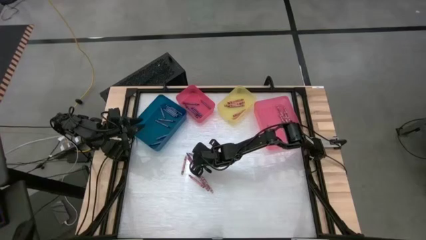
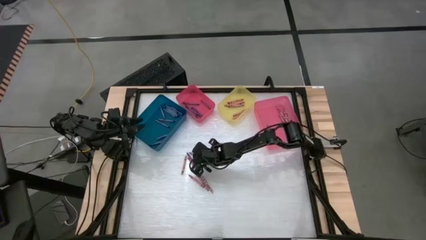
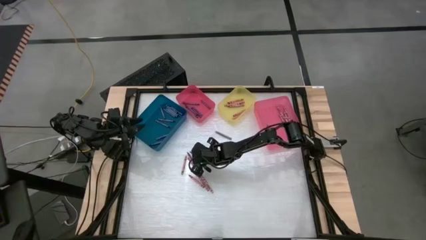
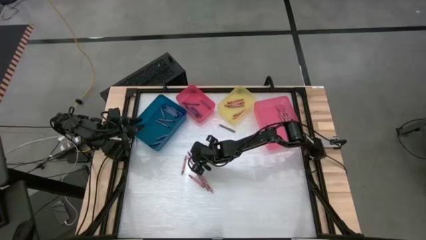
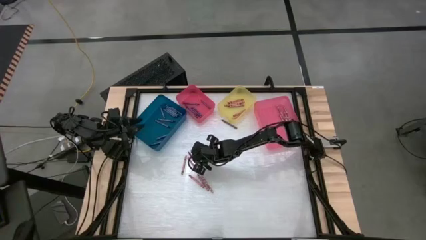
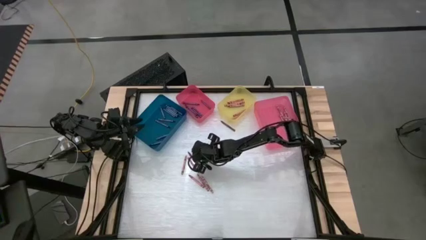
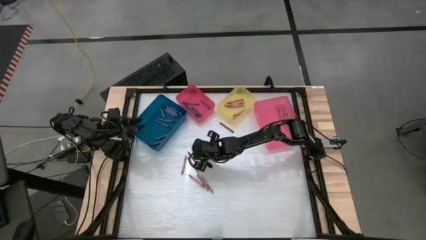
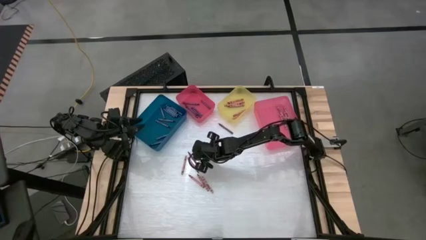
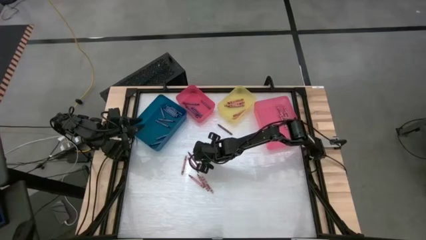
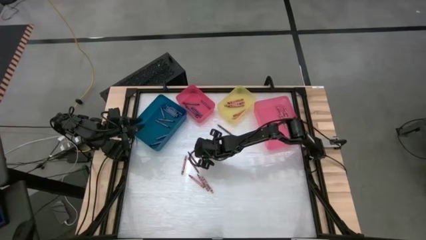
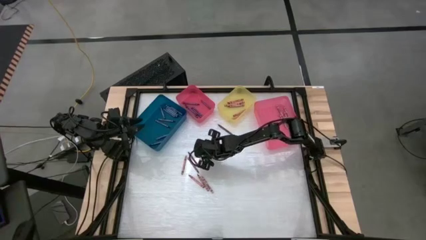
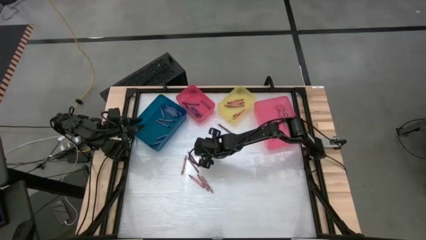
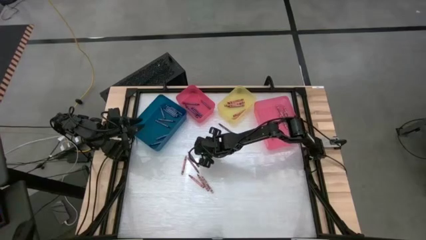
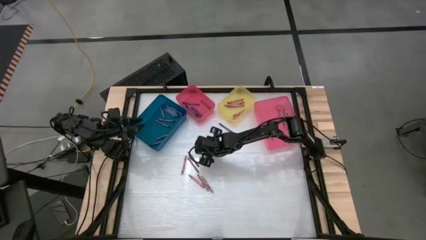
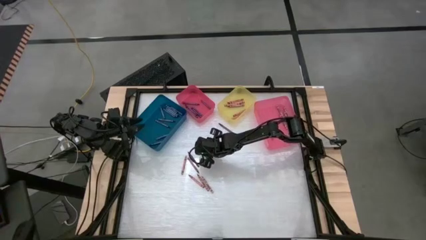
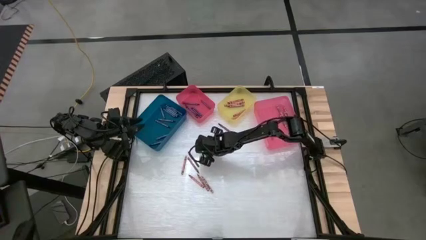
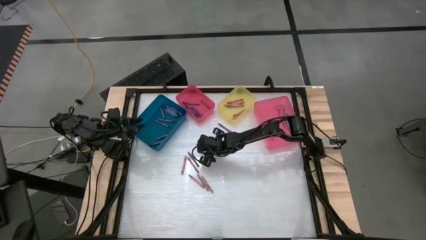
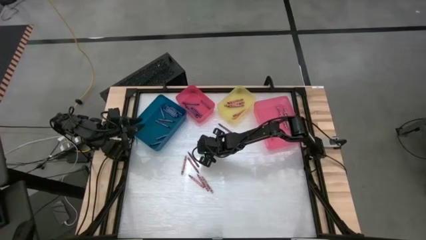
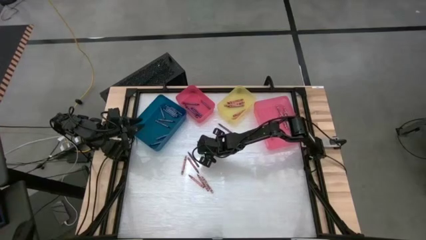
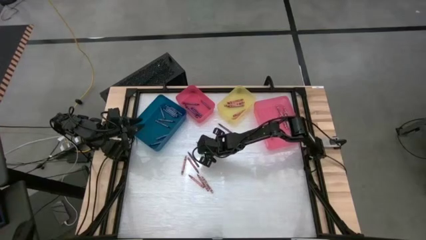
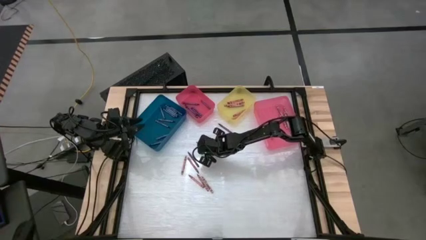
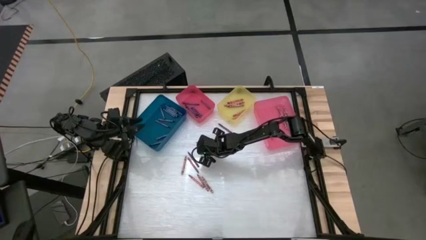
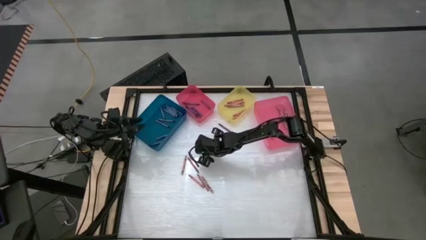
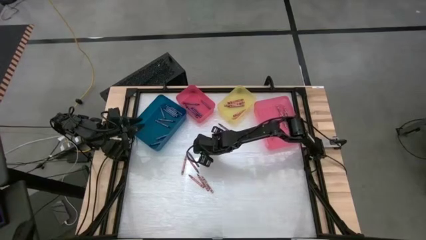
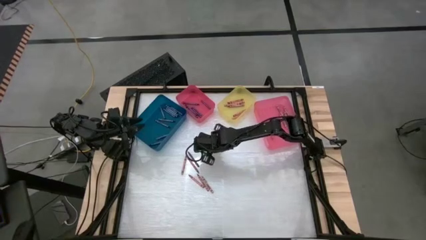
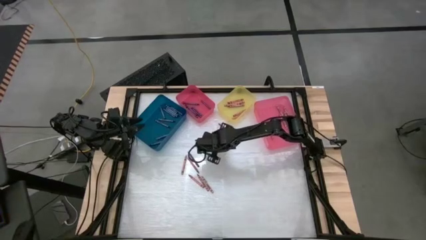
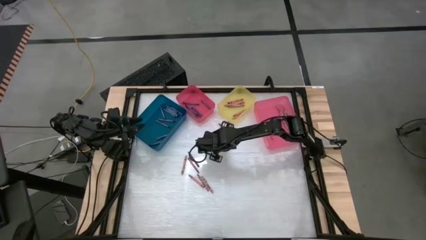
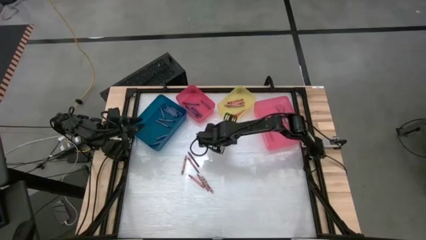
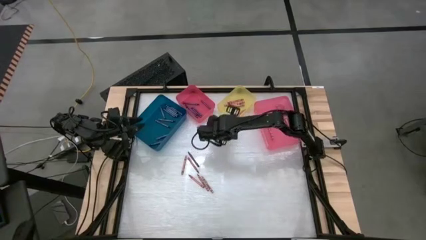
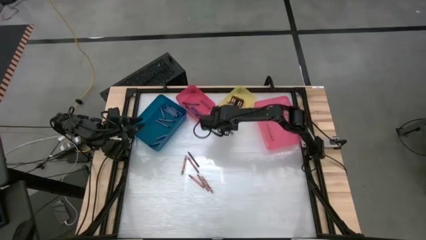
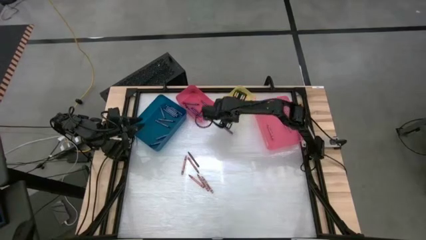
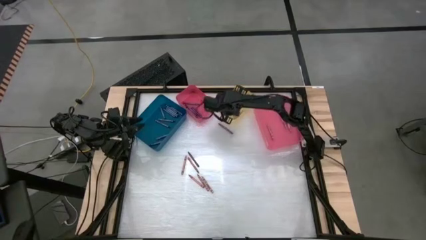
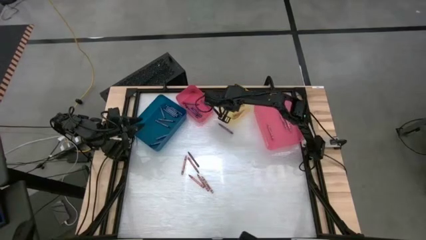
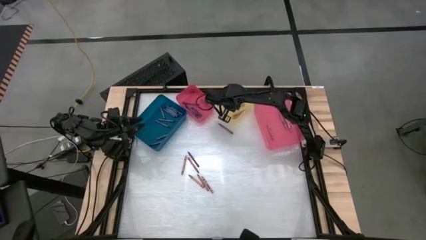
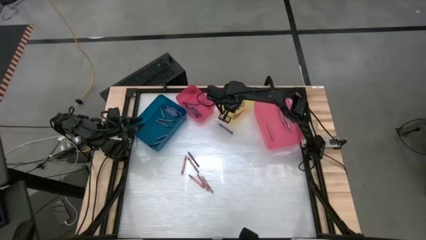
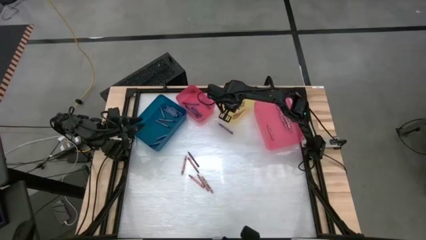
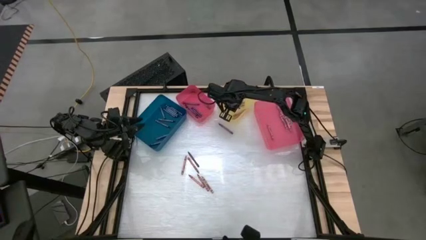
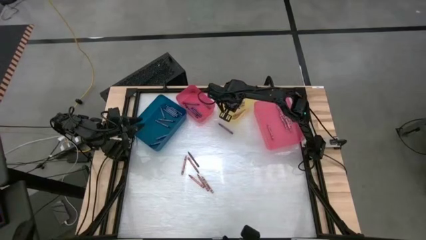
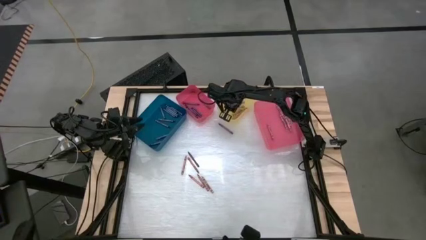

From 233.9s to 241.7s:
Task: Sort crayons
Put the red crayon into the yellow bin

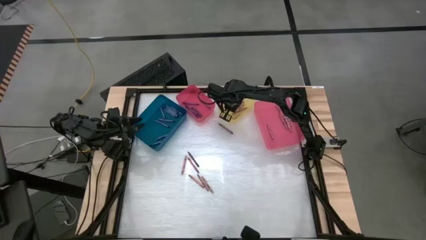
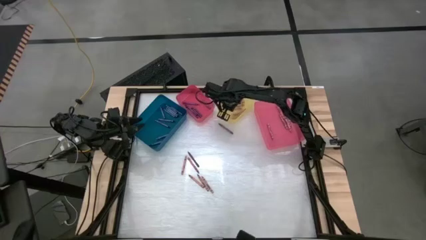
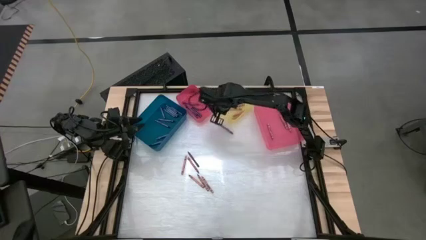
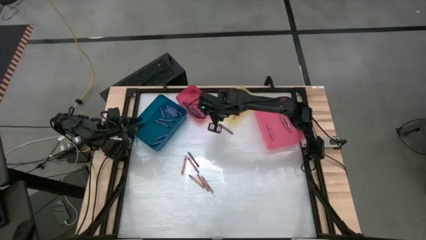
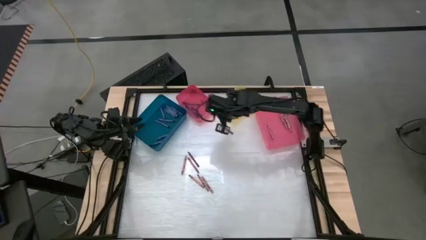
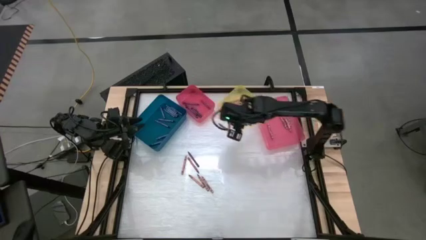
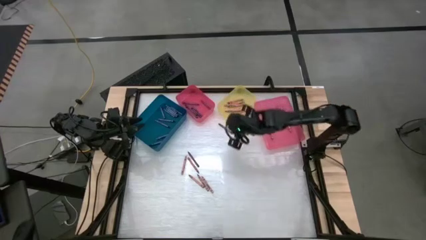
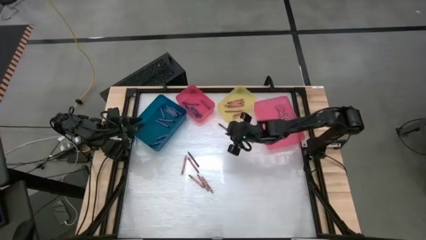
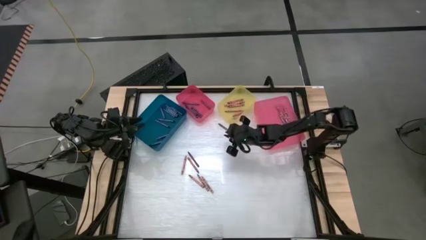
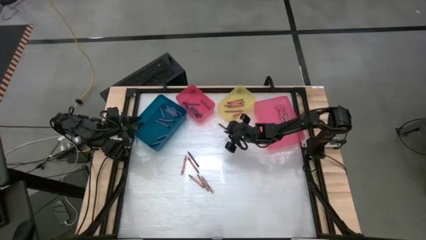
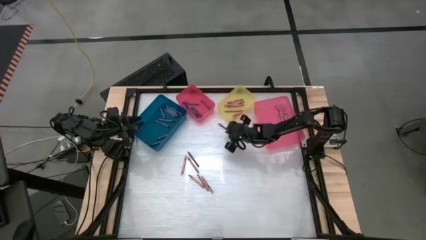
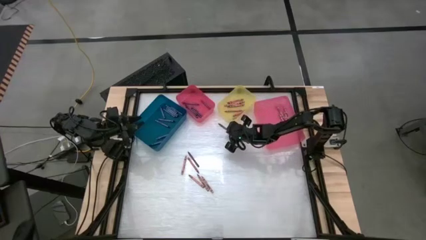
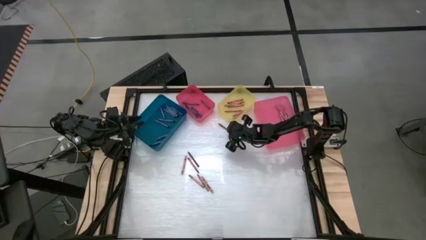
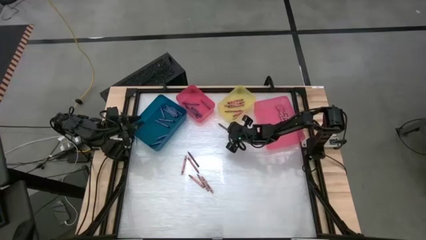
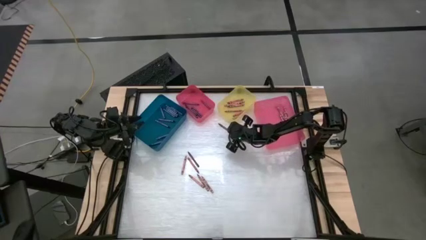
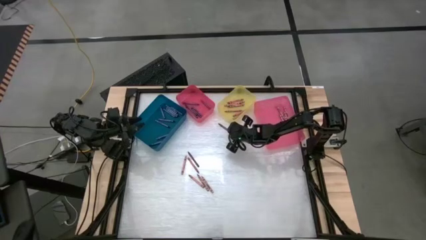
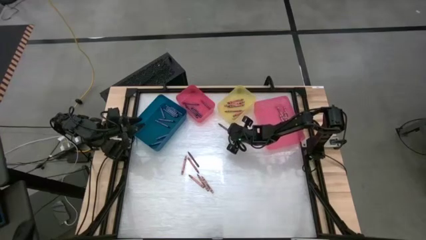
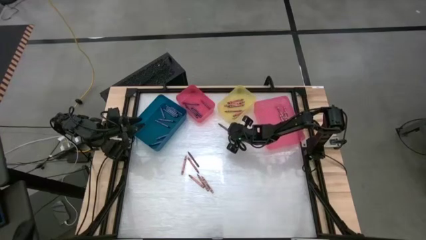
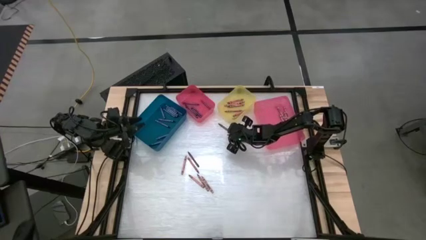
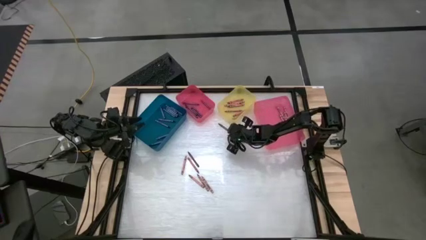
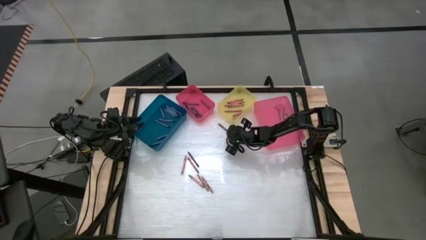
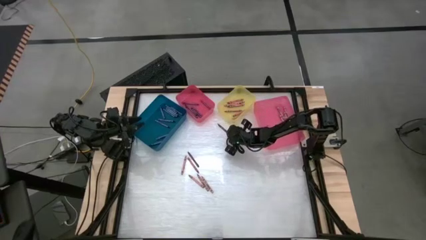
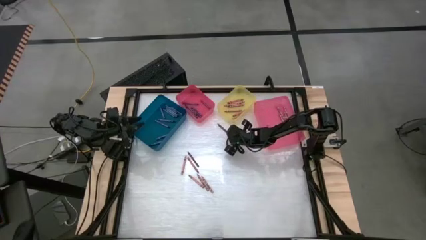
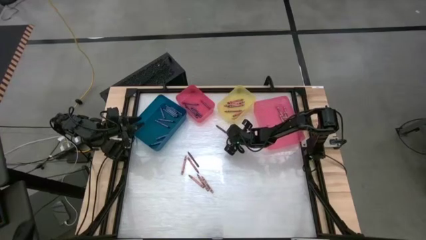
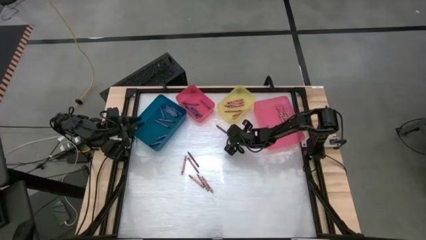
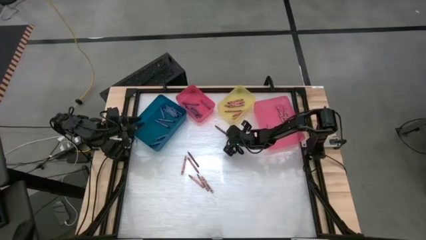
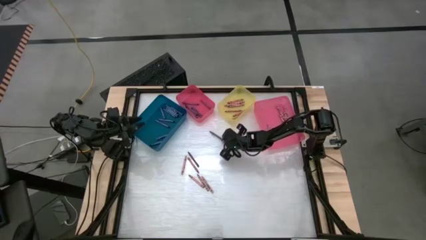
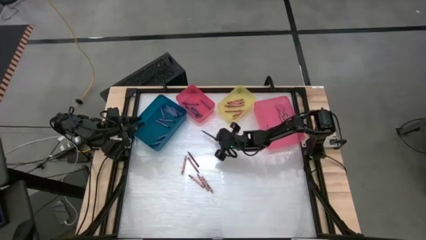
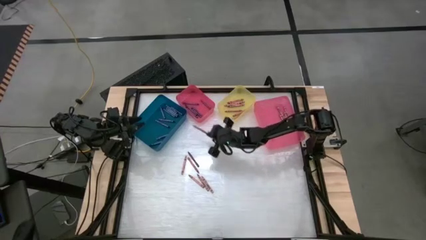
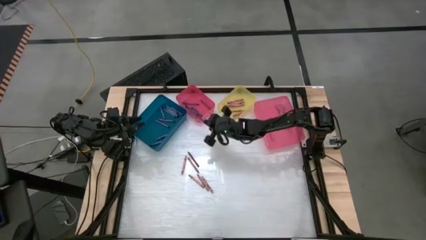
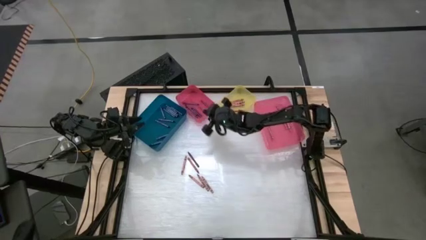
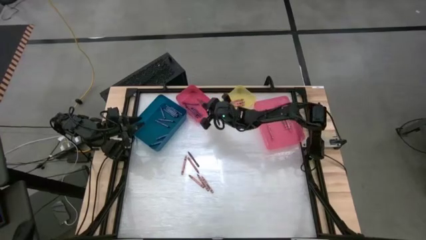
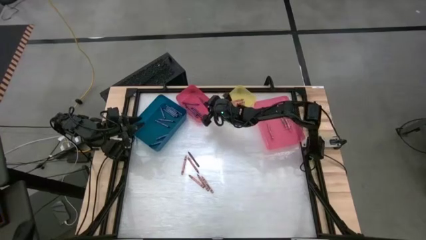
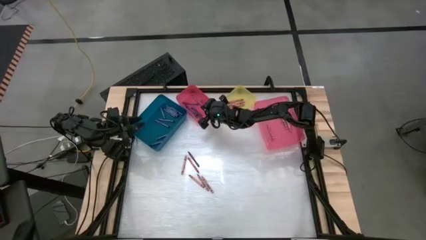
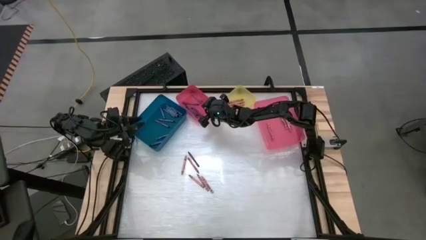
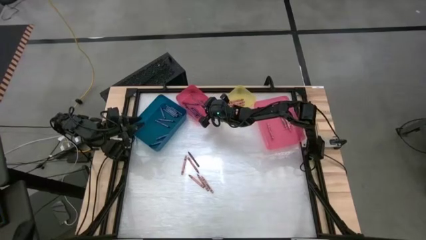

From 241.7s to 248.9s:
Put the violet crayon into the left pink bin
